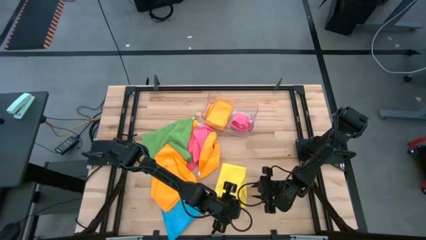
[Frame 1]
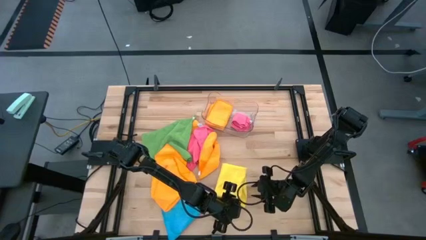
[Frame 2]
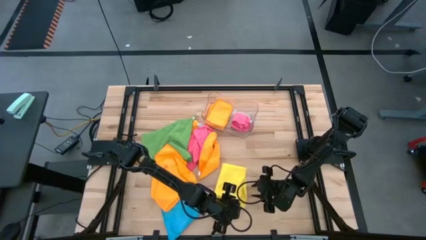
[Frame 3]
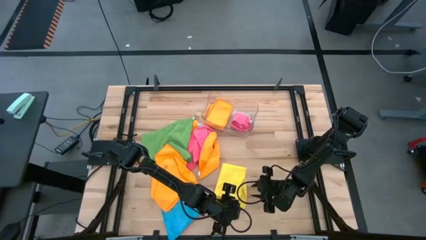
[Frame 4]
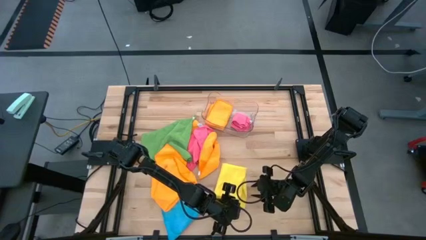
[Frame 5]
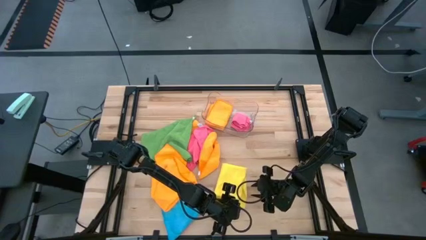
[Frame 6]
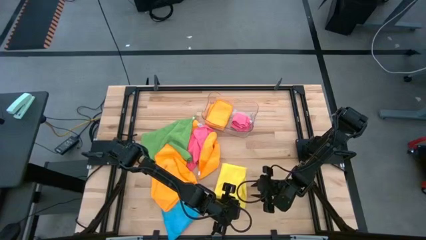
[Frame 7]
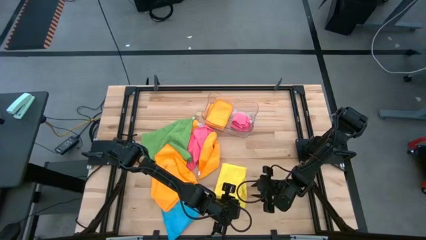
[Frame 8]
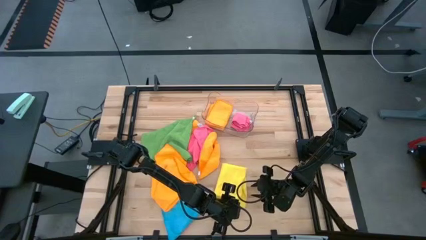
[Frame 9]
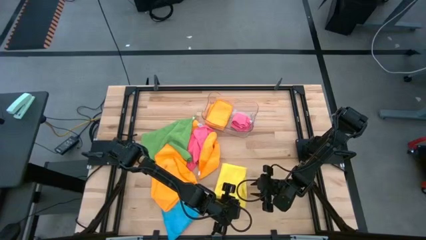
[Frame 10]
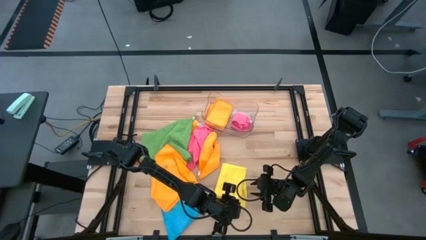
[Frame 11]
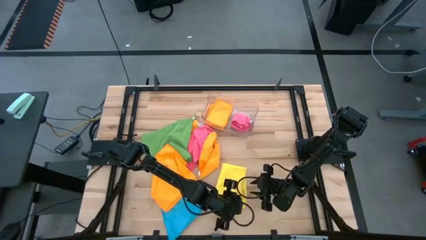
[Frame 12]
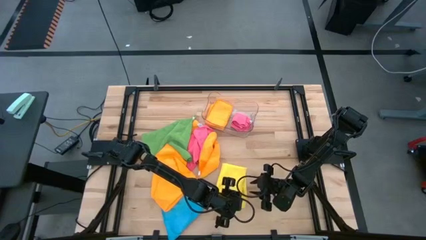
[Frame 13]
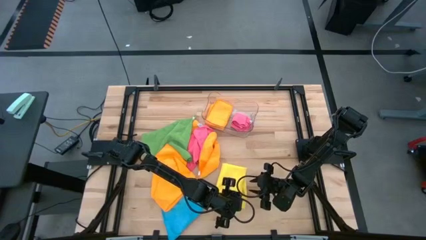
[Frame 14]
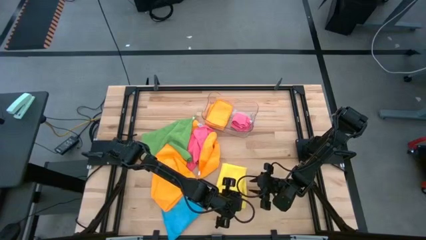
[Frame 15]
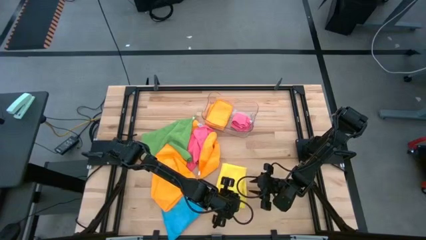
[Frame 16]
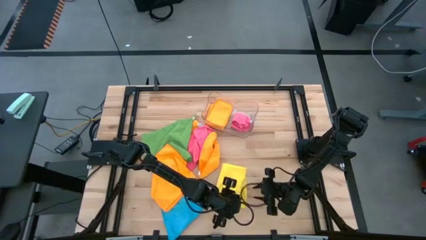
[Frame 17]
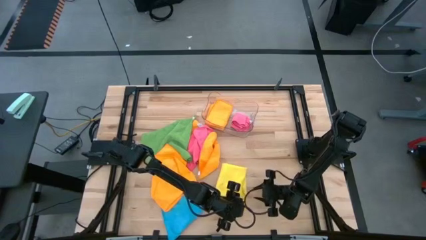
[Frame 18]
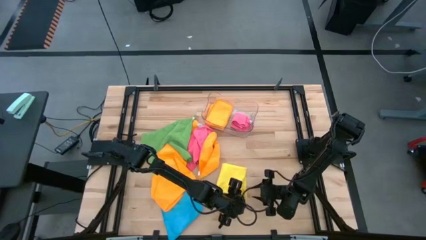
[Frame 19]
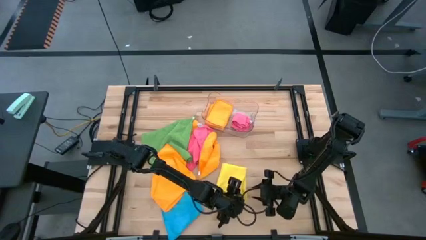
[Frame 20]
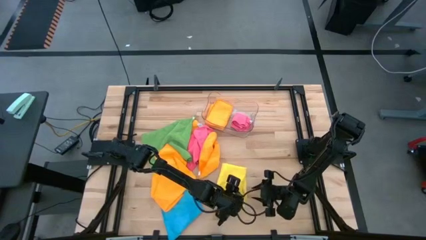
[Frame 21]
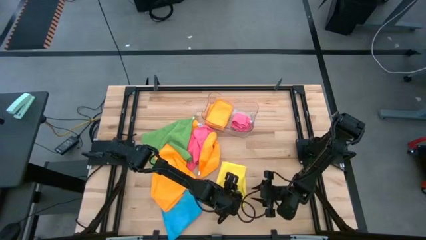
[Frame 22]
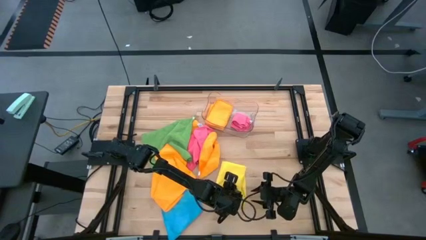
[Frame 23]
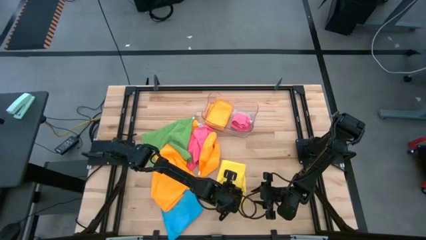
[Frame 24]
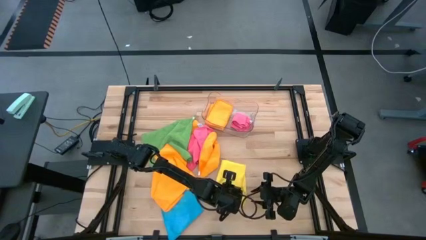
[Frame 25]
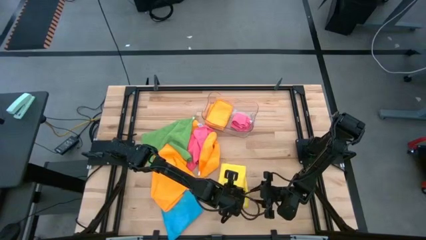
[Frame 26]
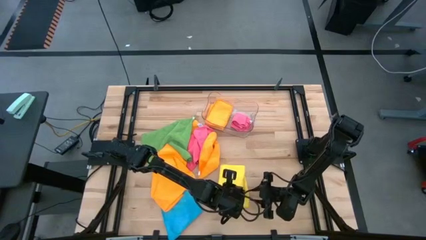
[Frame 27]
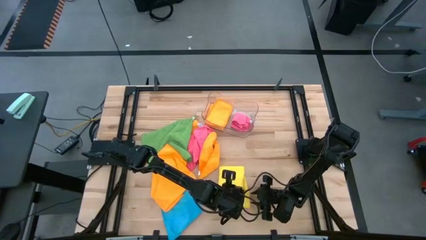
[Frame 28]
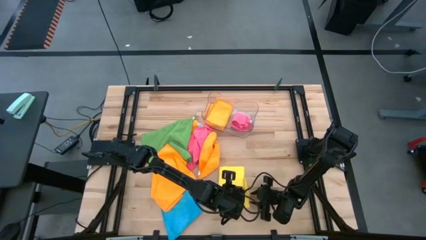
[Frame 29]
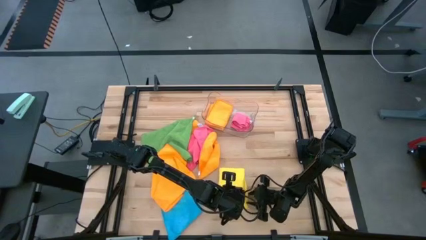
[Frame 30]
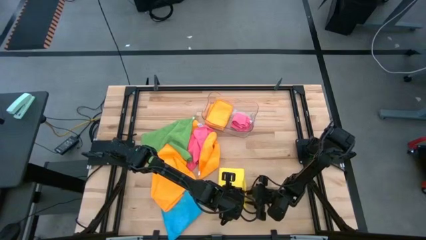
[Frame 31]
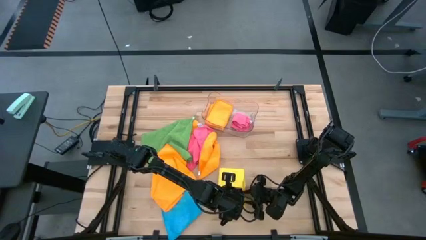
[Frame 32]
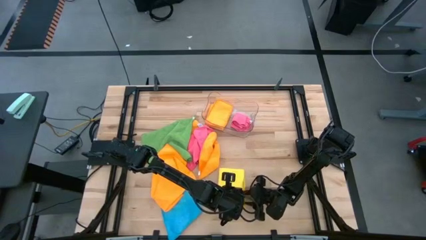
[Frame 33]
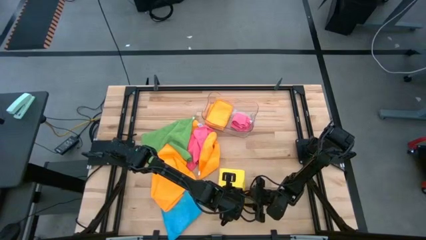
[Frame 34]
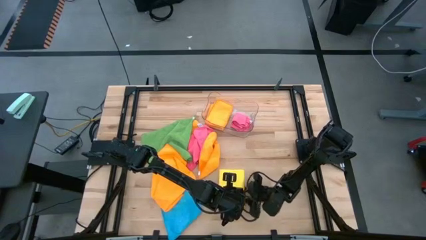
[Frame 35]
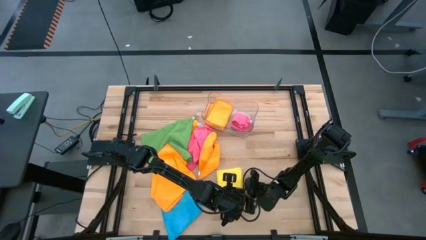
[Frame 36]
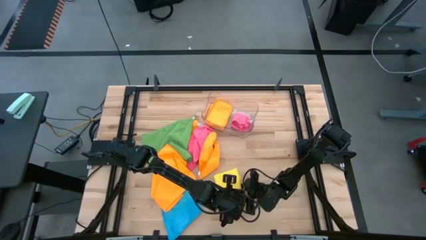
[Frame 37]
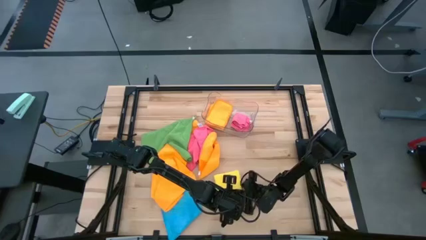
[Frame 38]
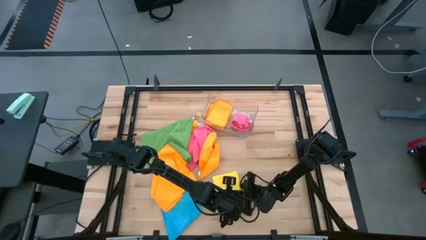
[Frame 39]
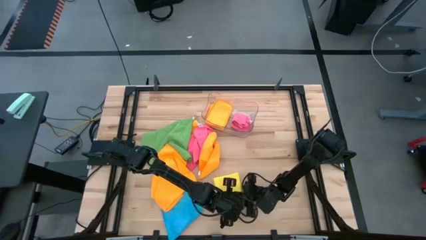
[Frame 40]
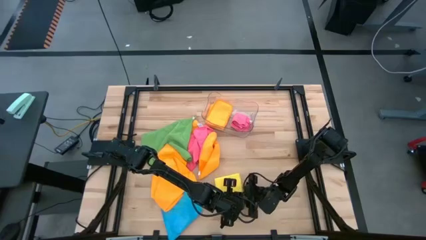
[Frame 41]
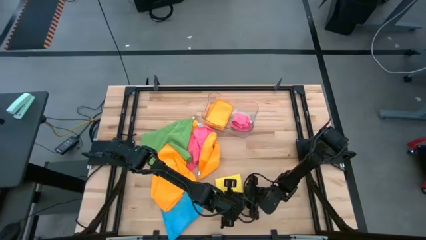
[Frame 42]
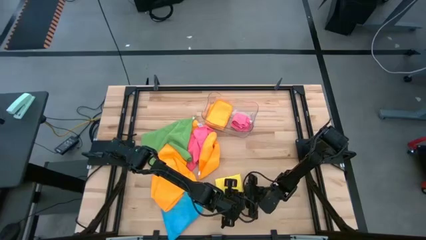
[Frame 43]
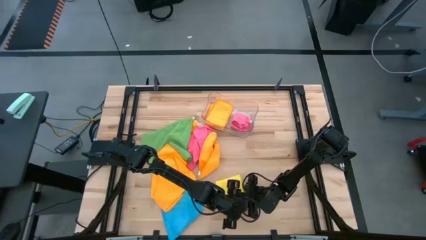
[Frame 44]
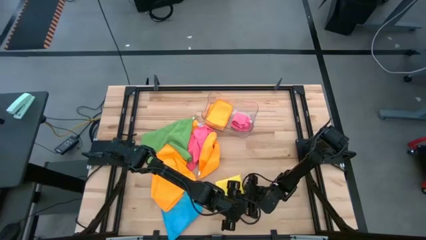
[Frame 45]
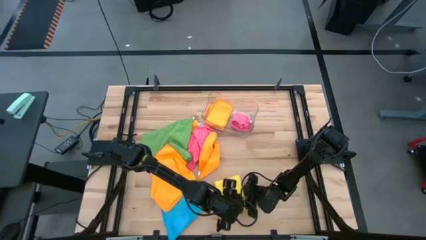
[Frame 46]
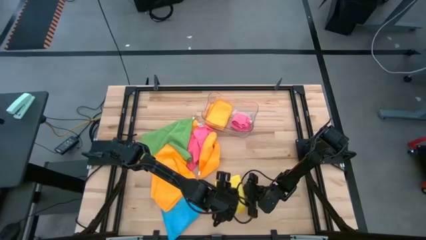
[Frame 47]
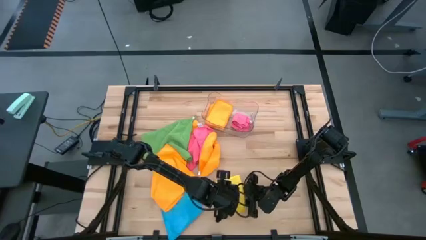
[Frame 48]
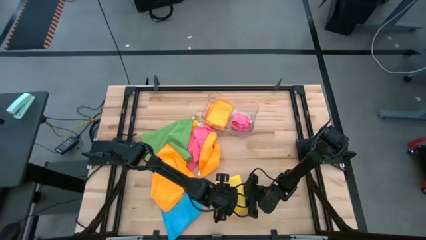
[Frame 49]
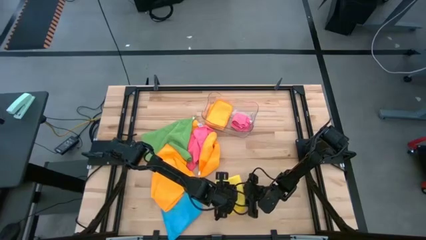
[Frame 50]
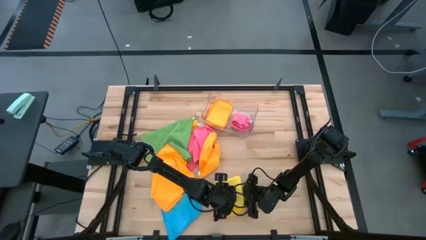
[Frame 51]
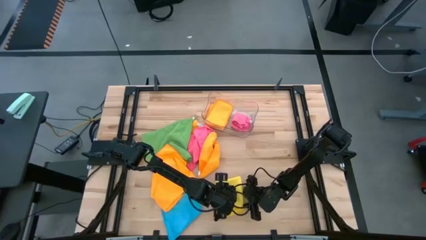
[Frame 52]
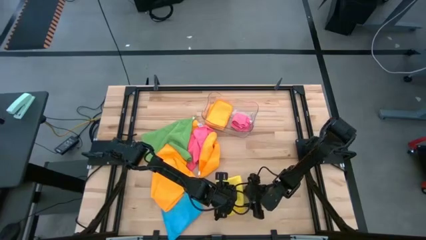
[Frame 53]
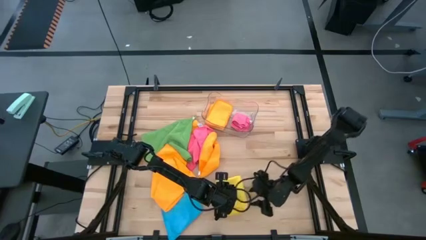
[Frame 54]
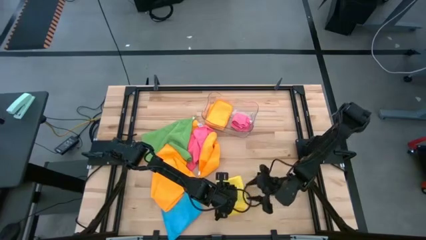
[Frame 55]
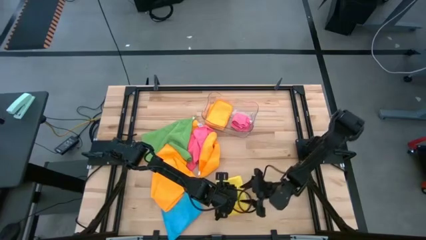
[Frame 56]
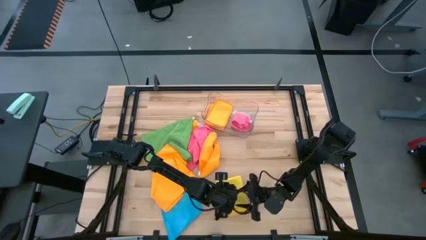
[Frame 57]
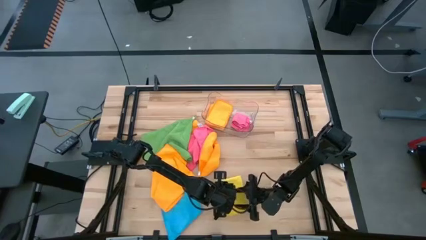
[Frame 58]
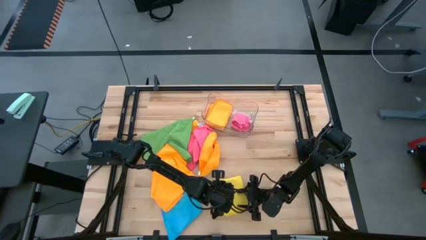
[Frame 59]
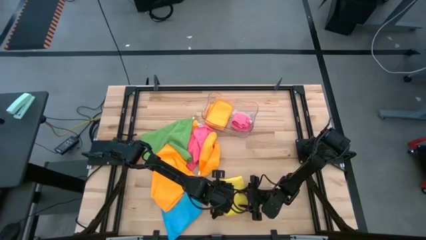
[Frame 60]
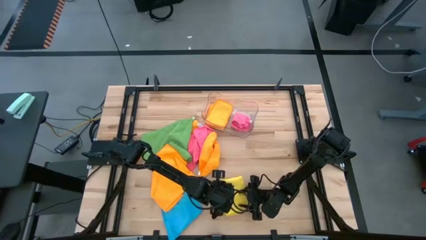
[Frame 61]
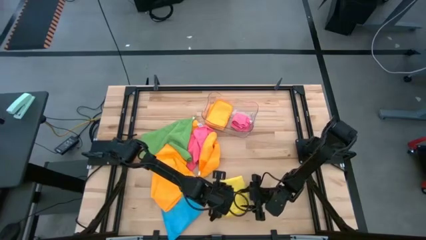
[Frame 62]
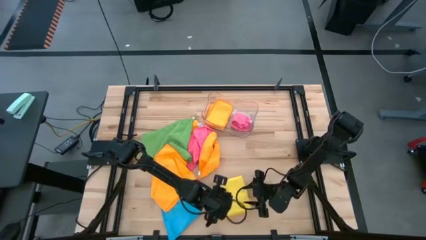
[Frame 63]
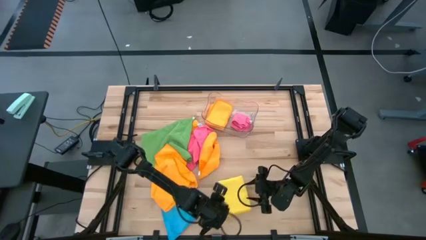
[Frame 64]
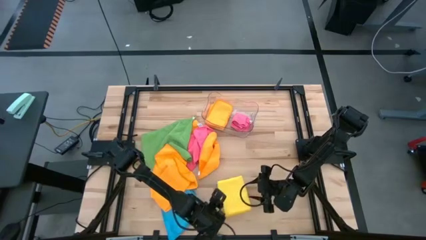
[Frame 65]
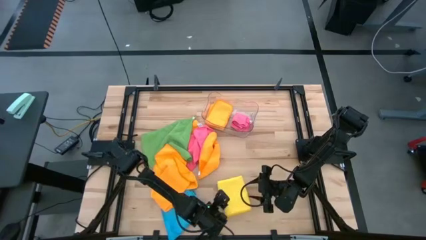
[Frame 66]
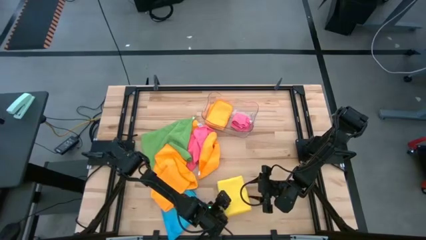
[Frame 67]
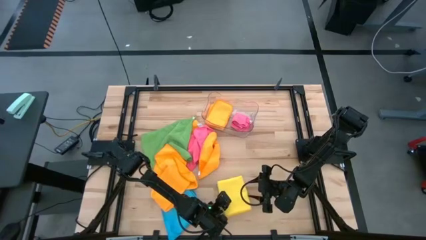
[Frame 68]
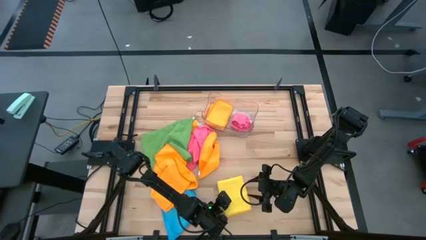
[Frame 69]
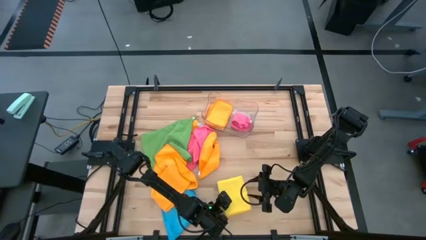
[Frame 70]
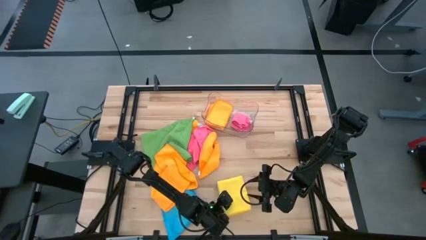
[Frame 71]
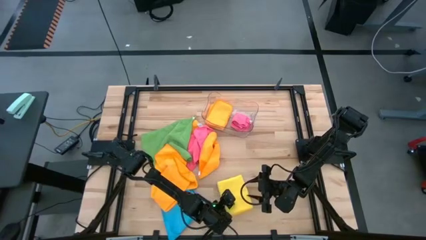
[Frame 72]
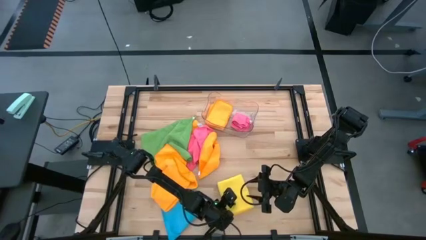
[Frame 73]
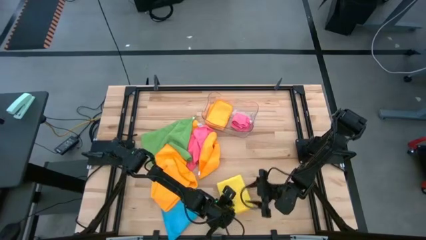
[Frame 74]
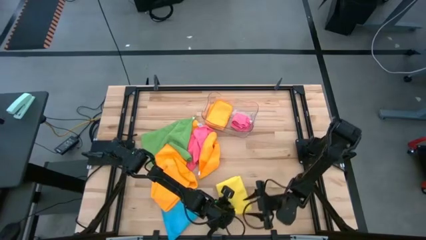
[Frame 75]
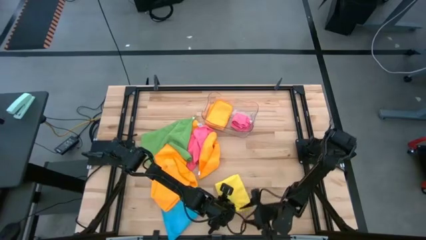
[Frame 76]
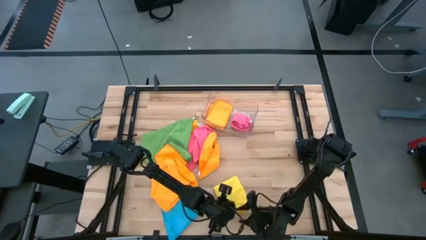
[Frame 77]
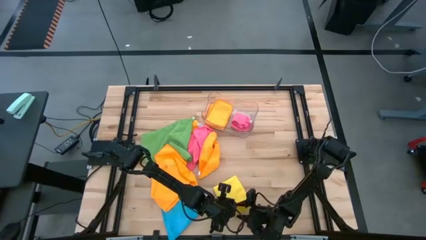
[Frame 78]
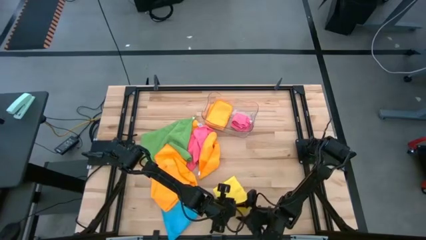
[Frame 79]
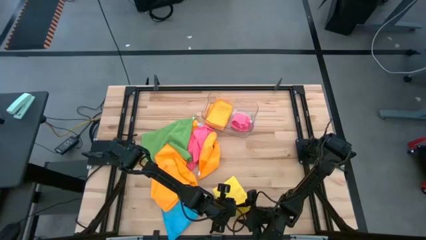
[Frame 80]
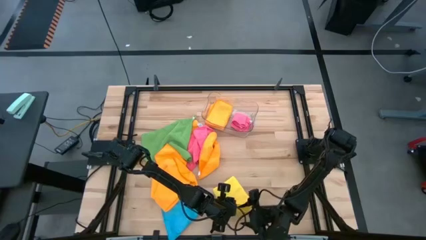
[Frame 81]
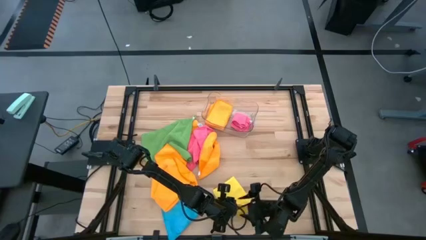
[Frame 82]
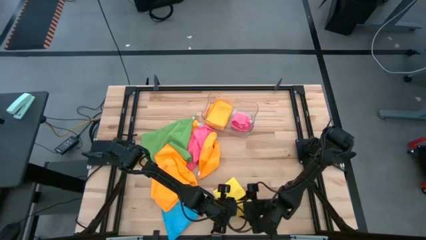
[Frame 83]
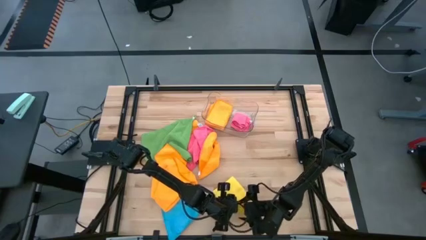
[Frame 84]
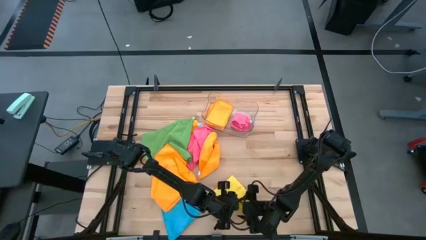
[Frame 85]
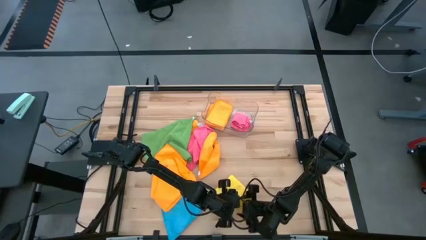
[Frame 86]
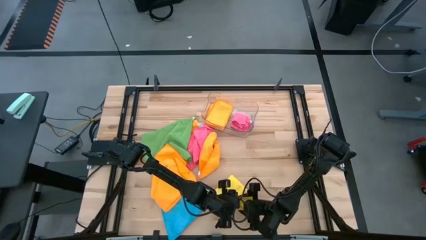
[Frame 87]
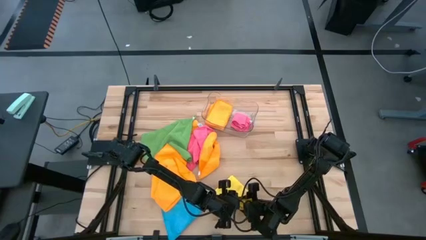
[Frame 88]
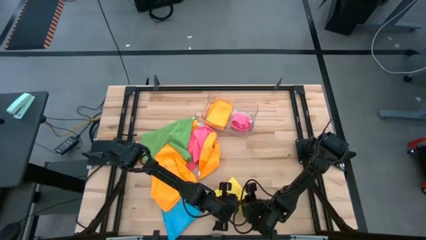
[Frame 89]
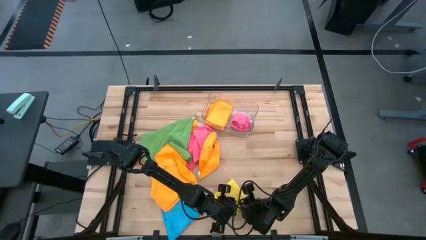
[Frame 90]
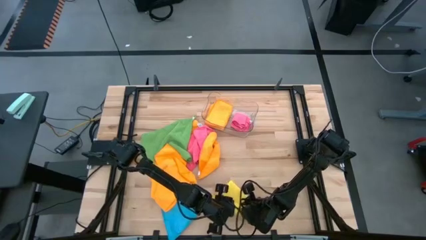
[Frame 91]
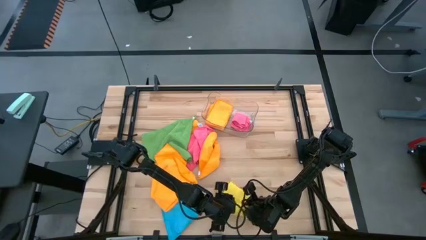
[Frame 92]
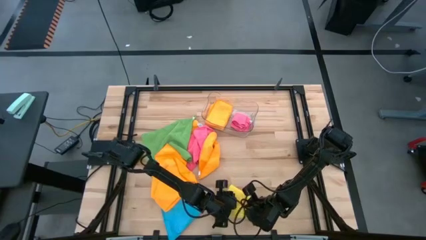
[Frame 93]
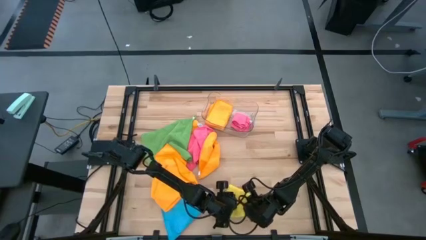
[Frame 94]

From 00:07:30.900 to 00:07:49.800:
Task: Fold microfiber towels
Fold the yellow microfiber cloth
